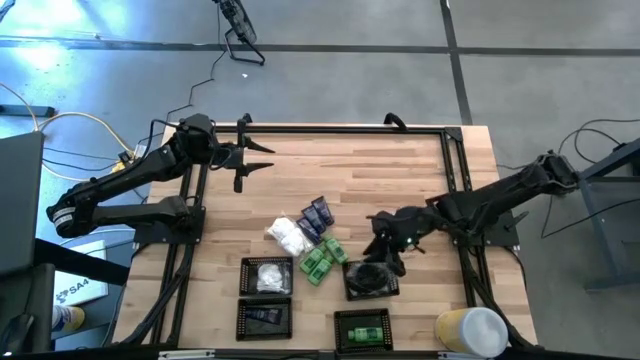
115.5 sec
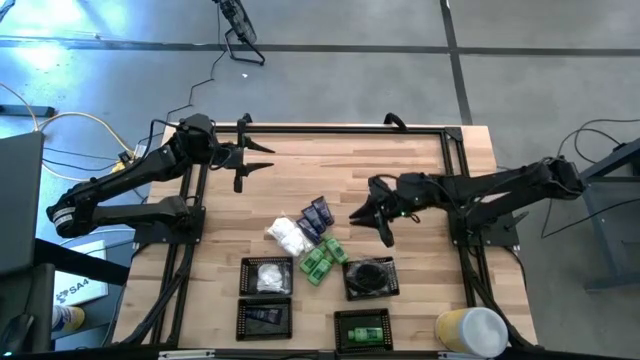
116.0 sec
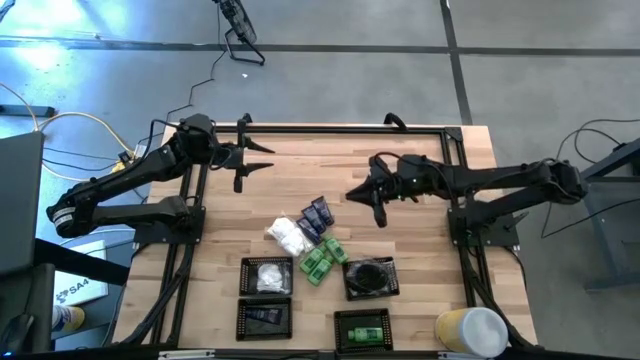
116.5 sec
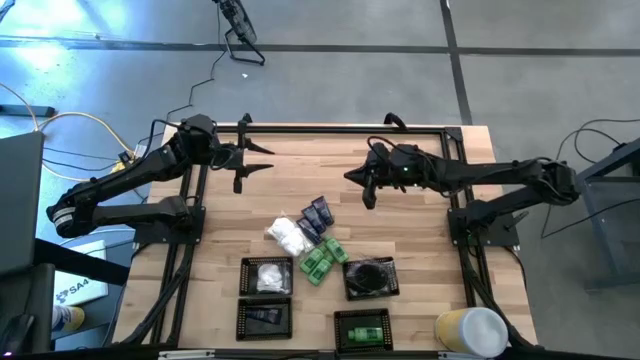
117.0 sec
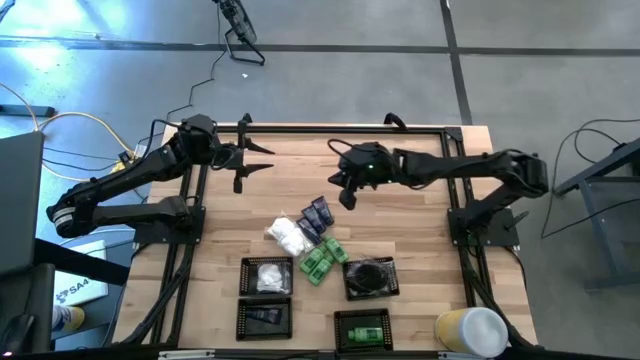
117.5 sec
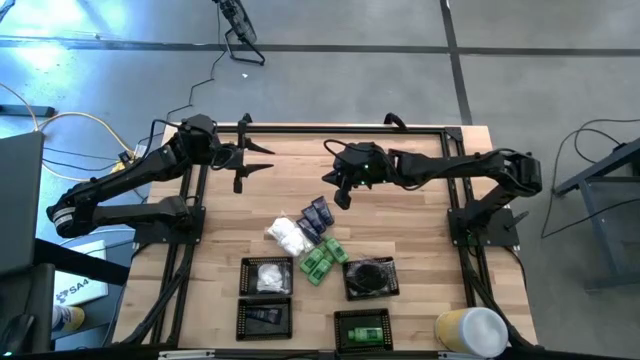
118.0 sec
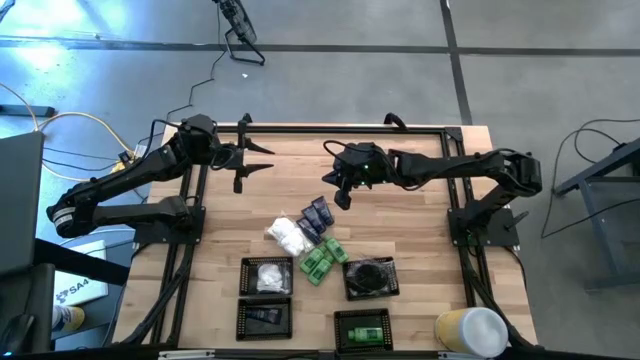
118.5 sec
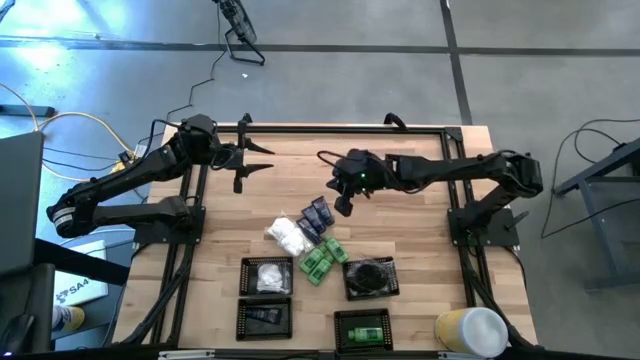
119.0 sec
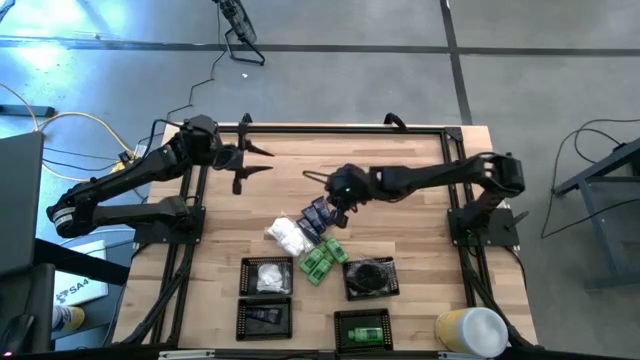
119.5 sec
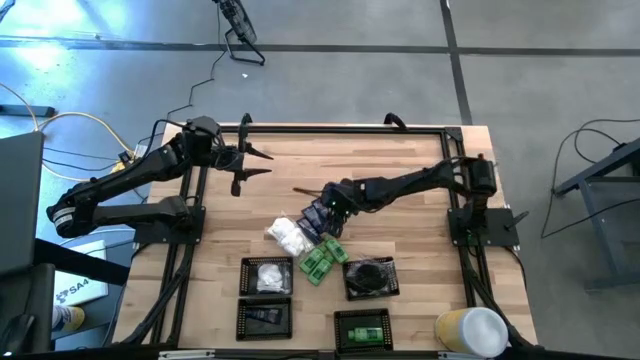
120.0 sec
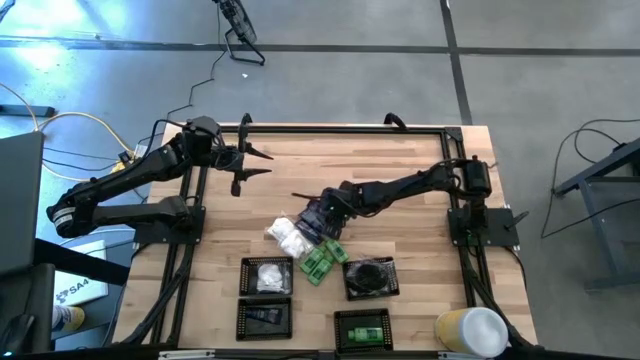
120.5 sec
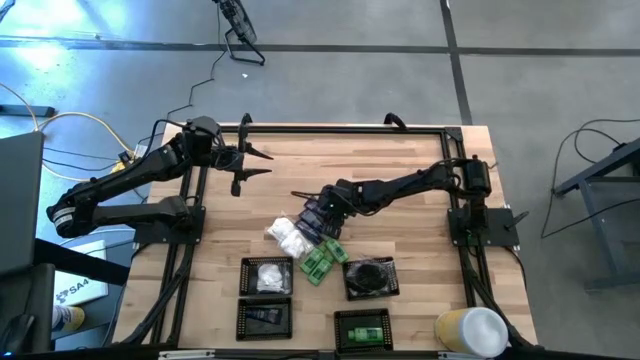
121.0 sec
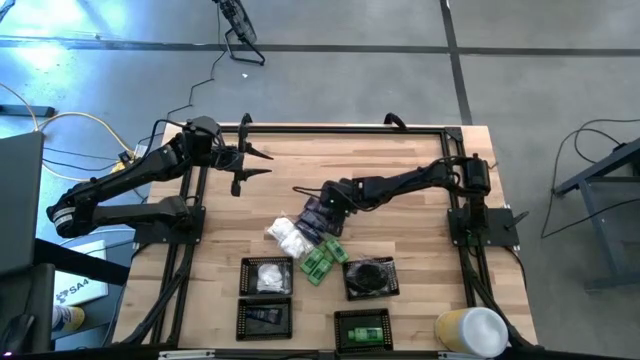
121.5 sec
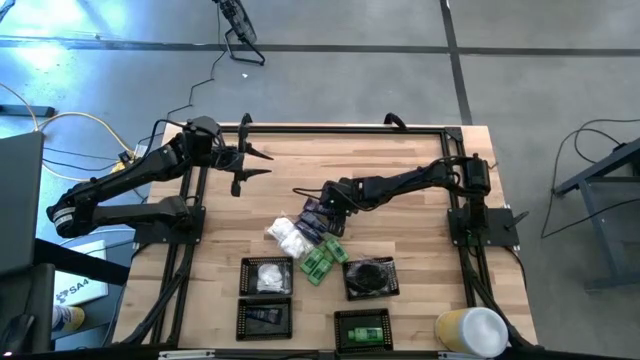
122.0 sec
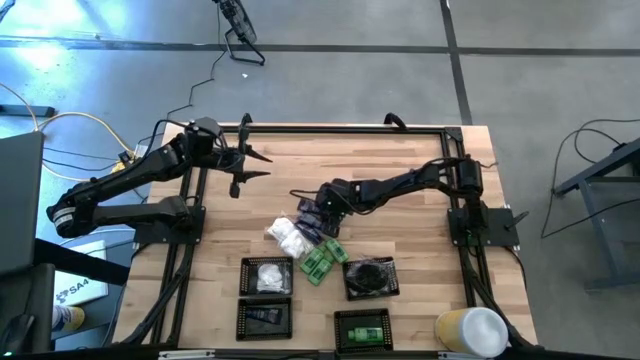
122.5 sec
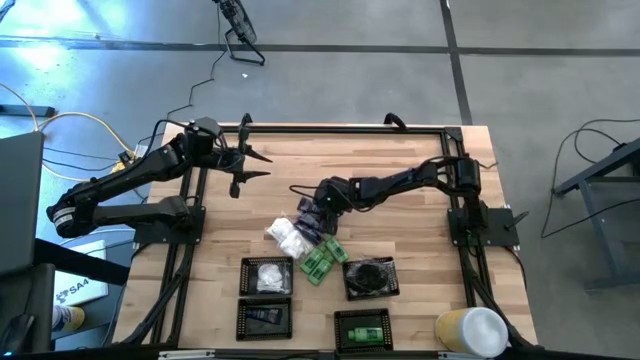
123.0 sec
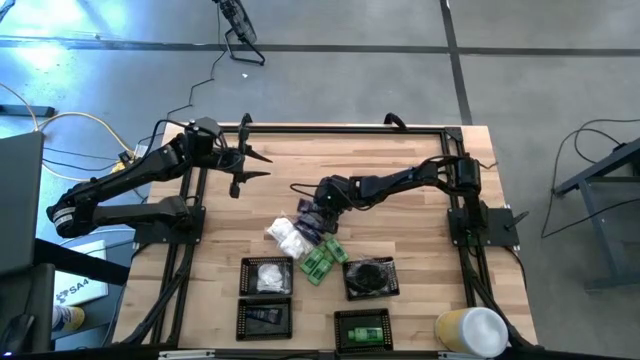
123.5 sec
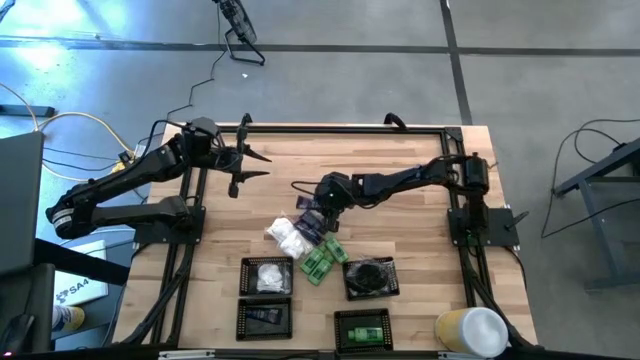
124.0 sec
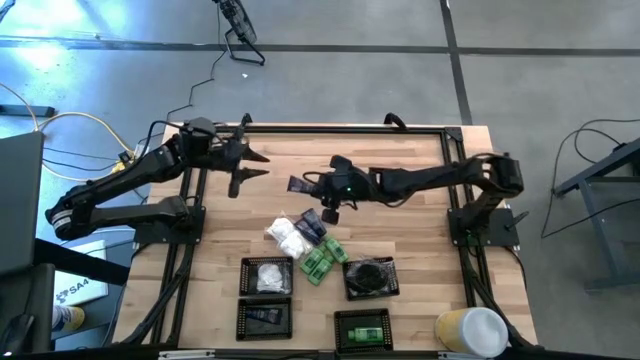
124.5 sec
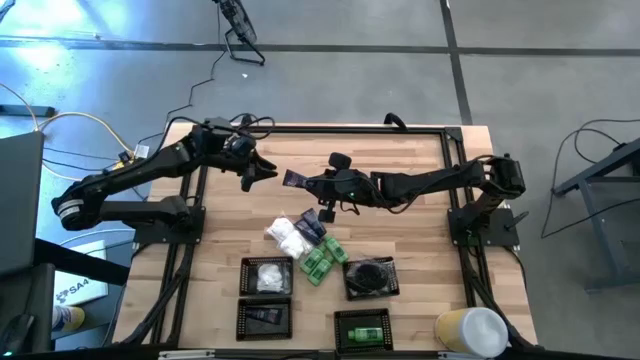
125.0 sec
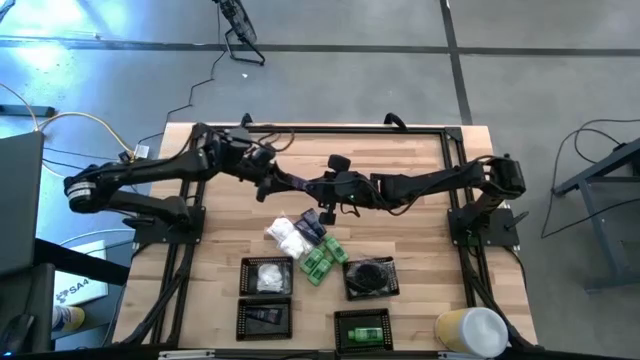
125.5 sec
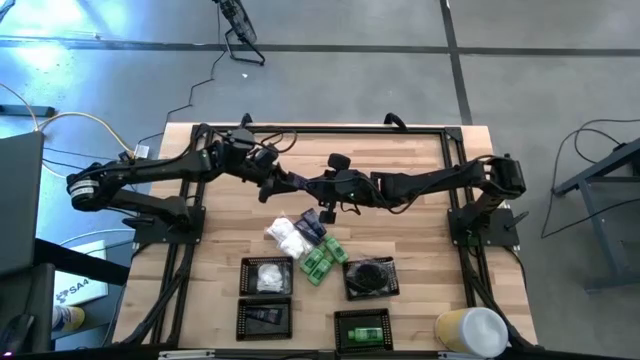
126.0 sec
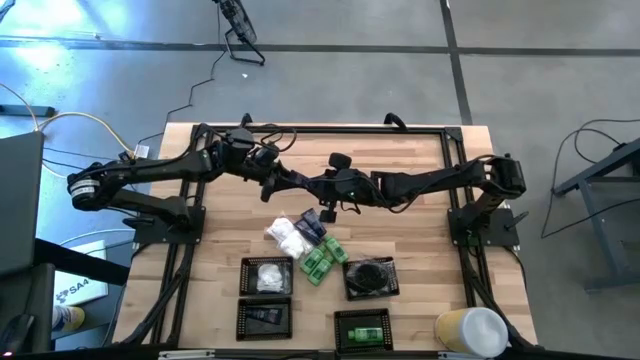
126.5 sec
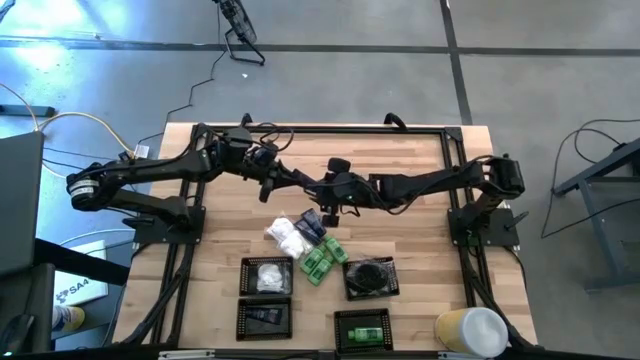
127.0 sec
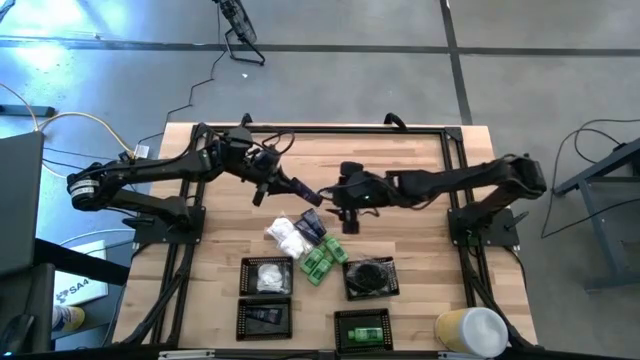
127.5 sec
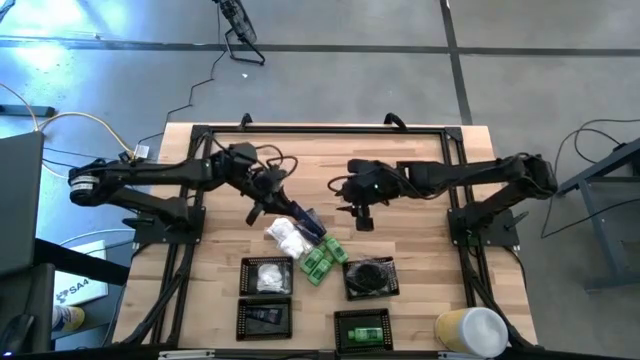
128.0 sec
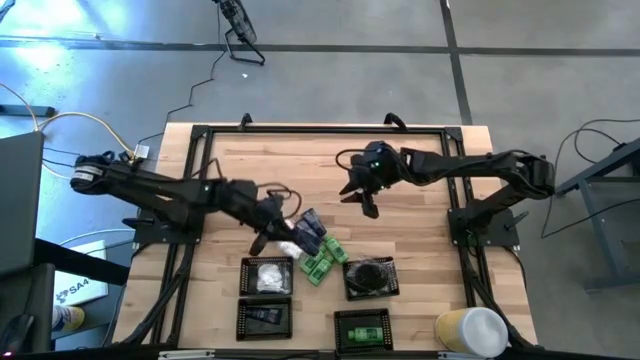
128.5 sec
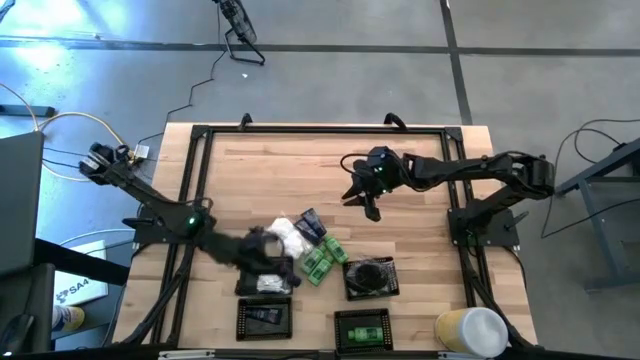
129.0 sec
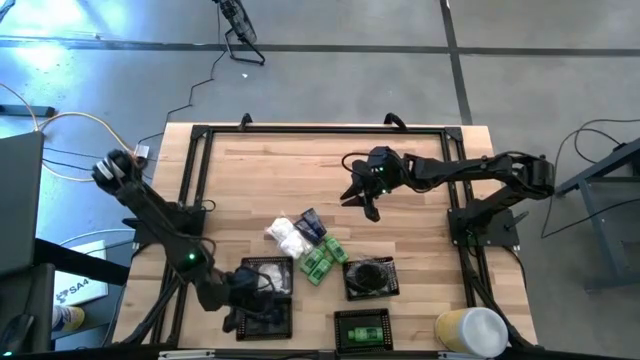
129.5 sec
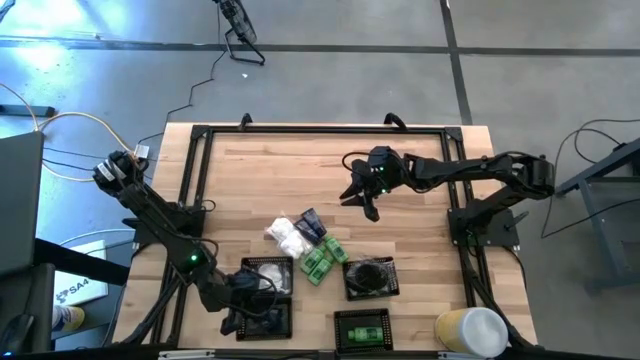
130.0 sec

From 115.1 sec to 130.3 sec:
Task: Pick & Place Travel size toiletries
Put the black shaving cream into the bottom left black bin

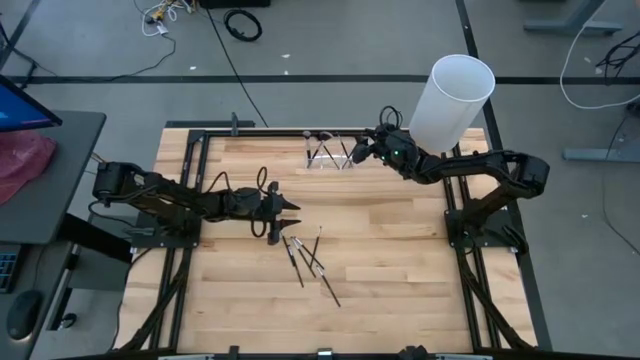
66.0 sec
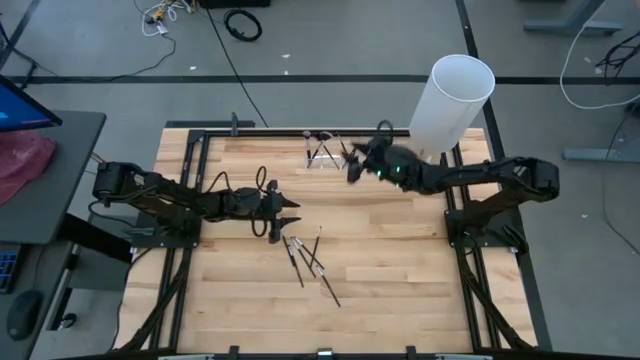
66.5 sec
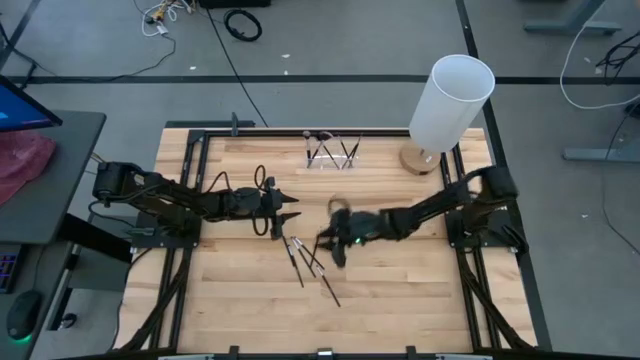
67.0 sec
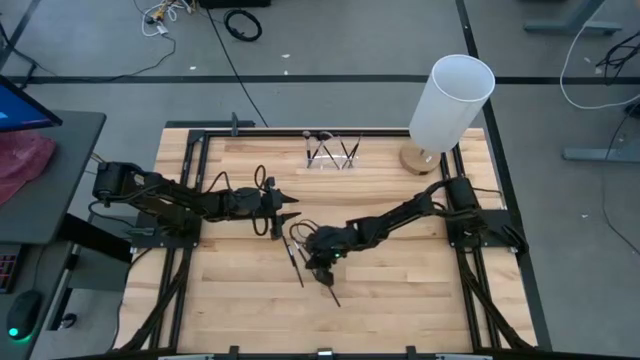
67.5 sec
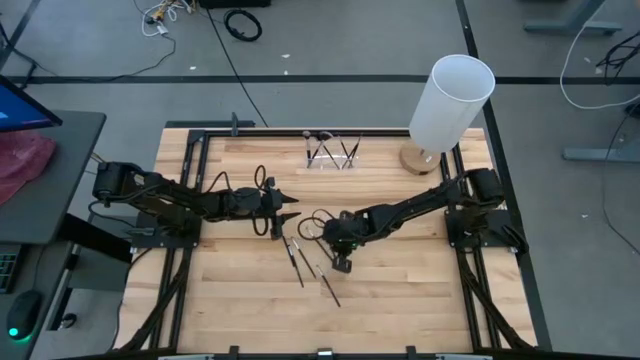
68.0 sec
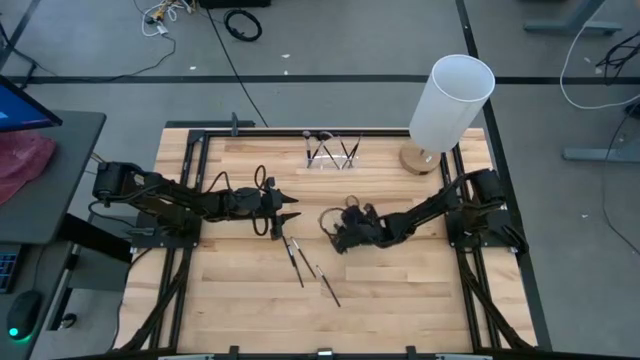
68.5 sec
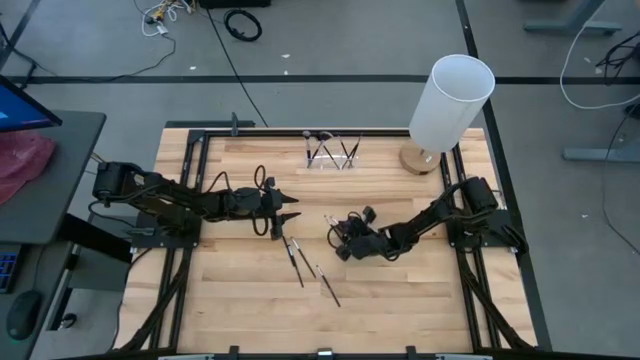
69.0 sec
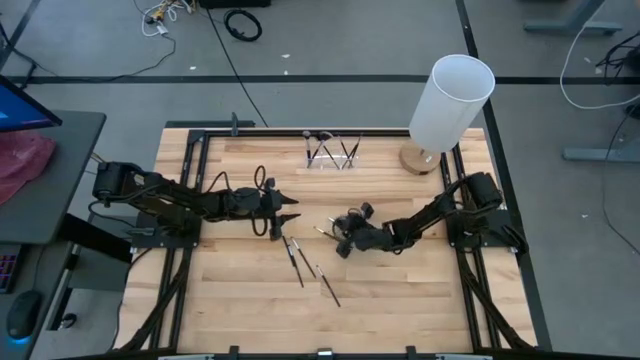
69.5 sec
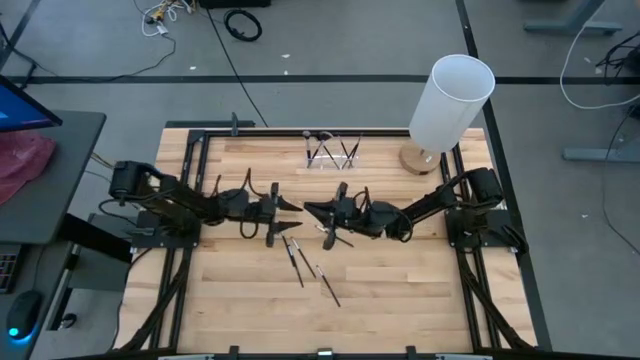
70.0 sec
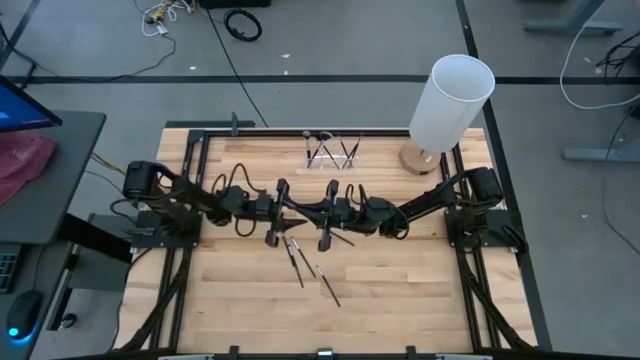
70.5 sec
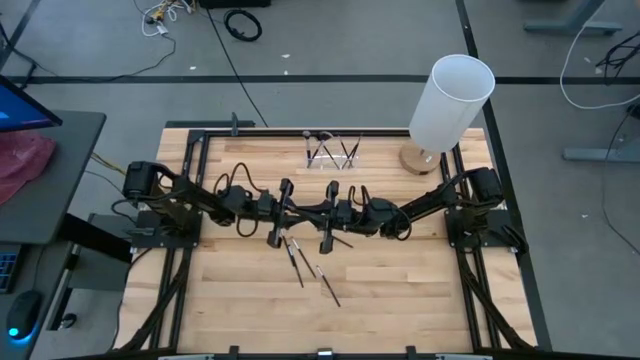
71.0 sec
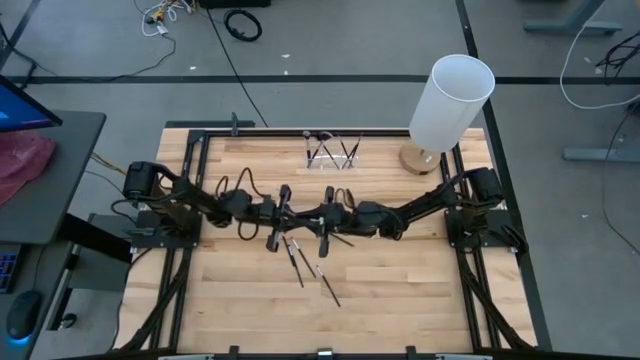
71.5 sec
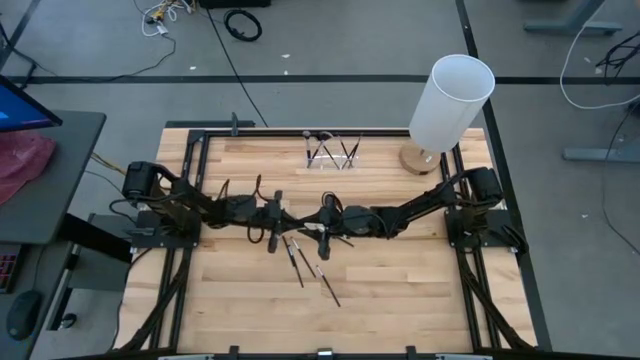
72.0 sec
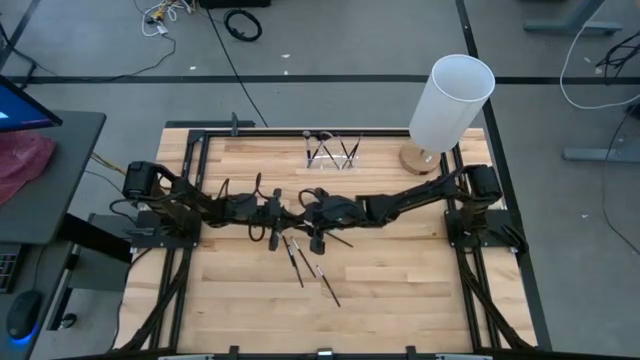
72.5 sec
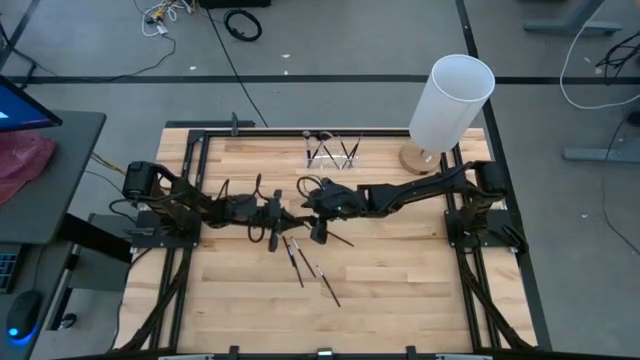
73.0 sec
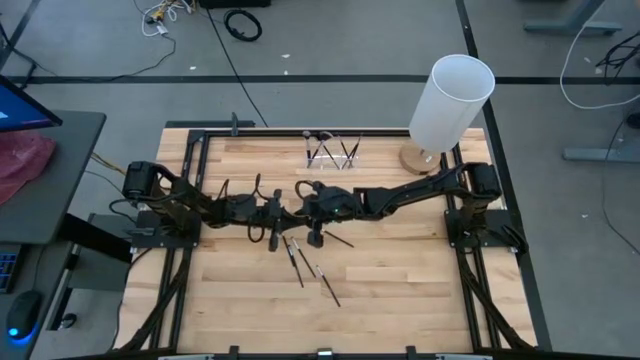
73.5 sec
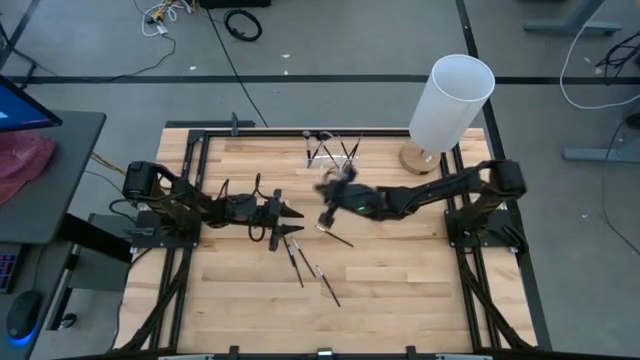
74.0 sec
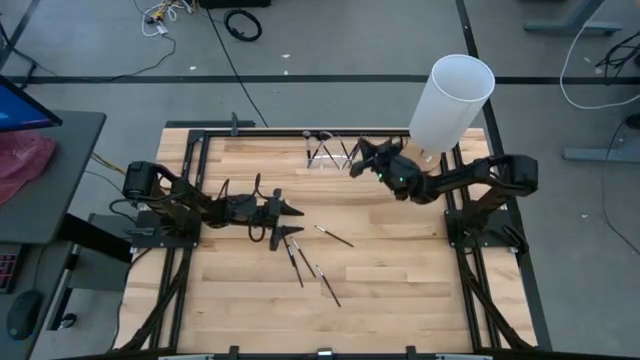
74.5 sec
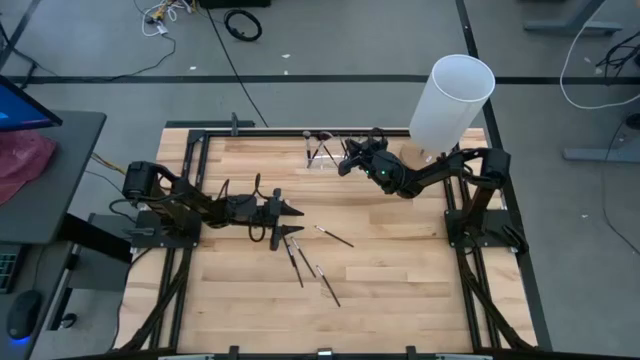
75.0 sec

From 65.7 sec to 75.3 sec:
Task: Pick & Place Makeup Supplies
Put the black makeup brush into the transparent organizer
